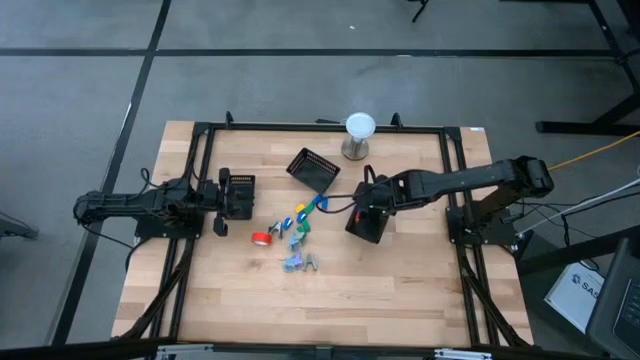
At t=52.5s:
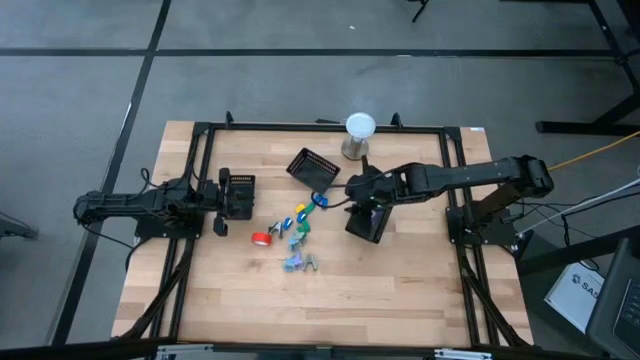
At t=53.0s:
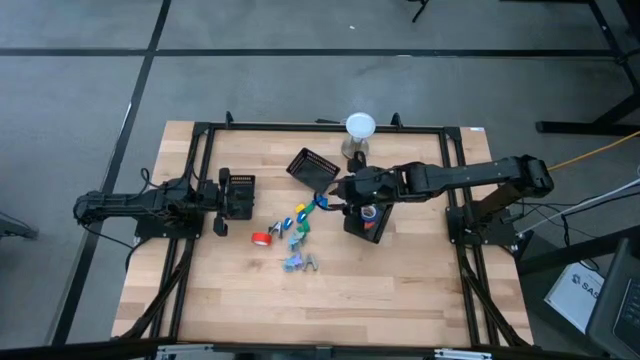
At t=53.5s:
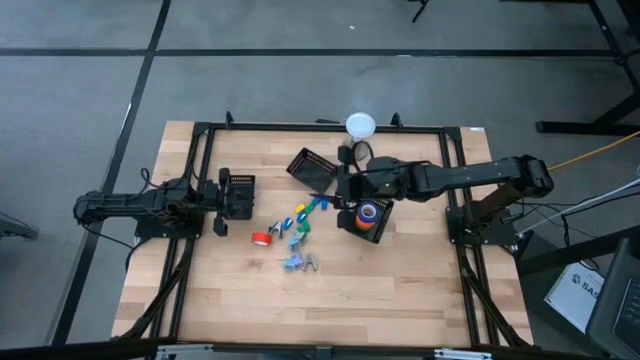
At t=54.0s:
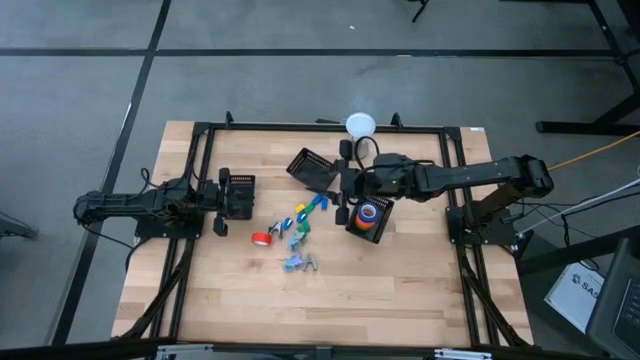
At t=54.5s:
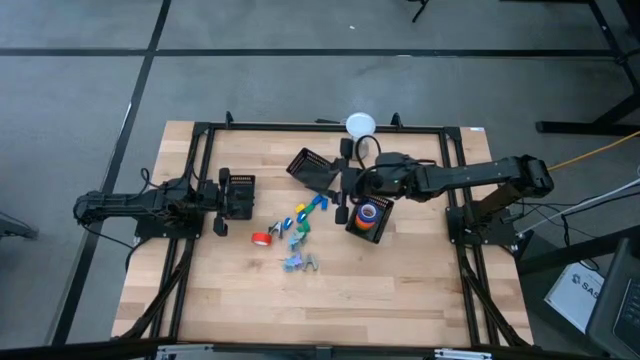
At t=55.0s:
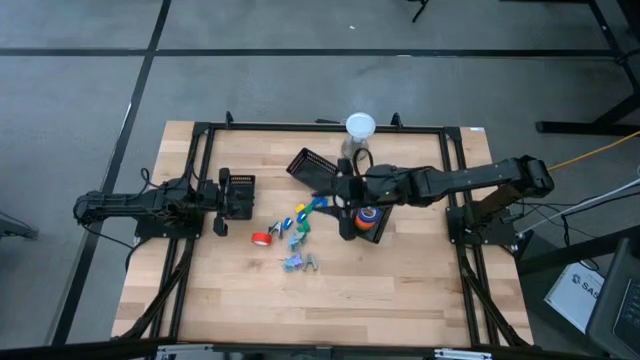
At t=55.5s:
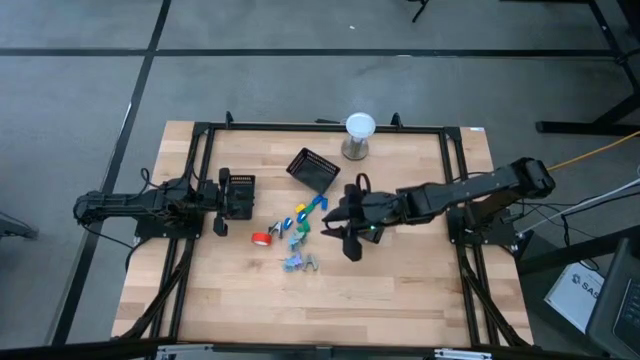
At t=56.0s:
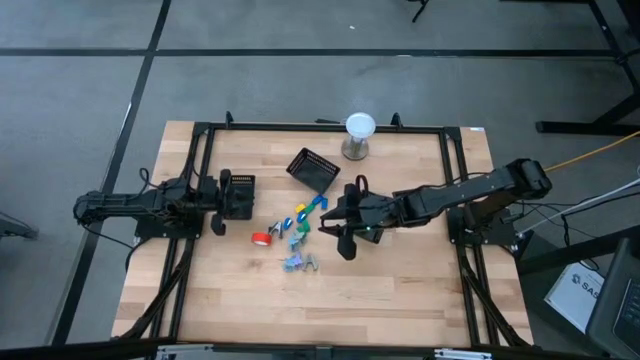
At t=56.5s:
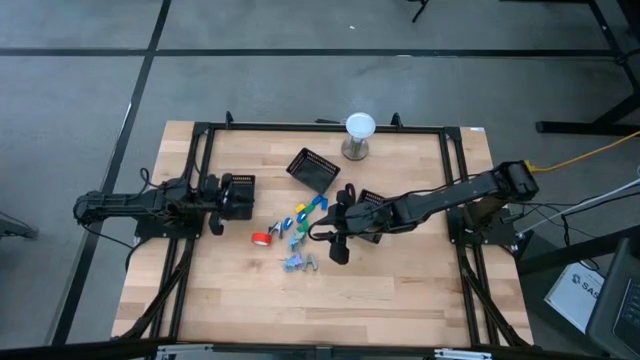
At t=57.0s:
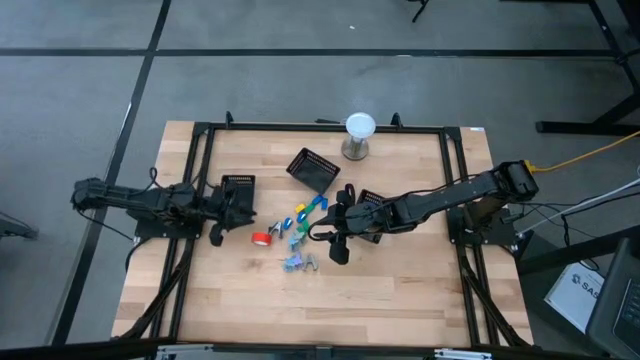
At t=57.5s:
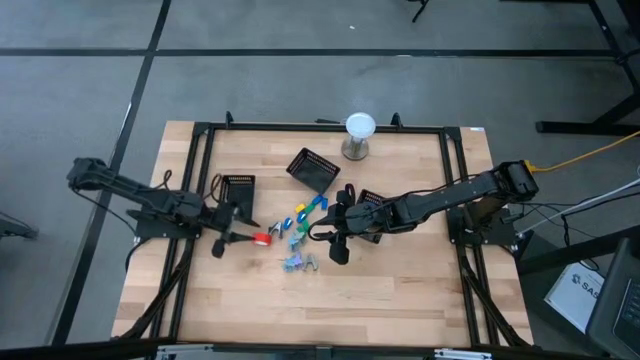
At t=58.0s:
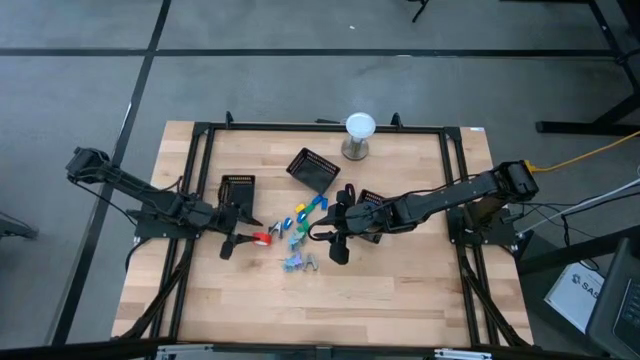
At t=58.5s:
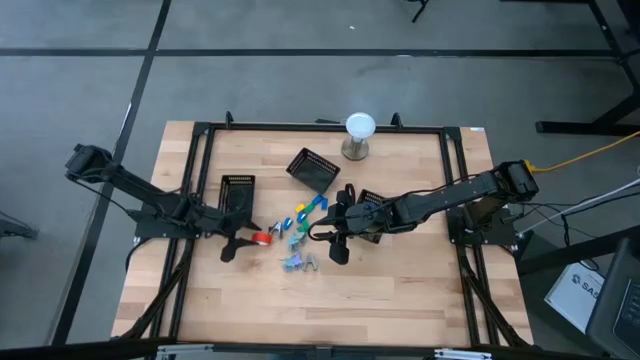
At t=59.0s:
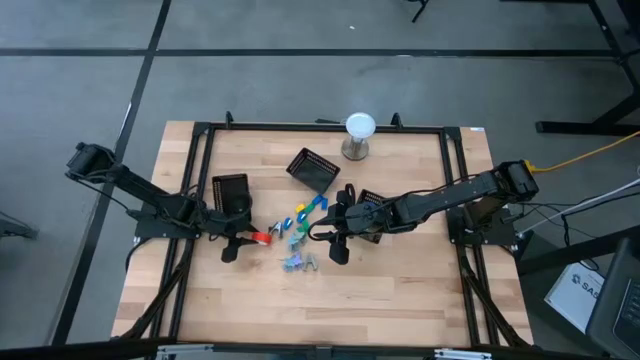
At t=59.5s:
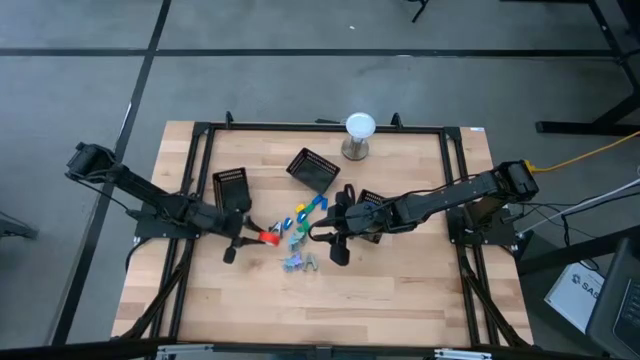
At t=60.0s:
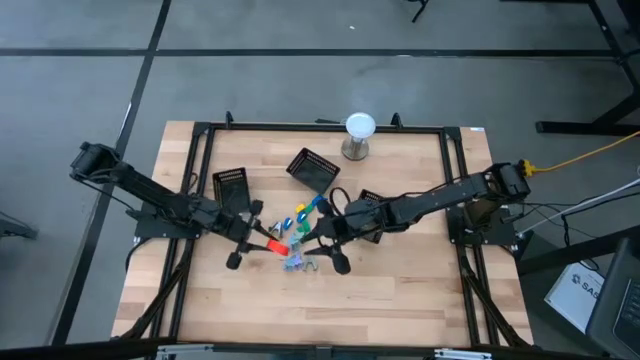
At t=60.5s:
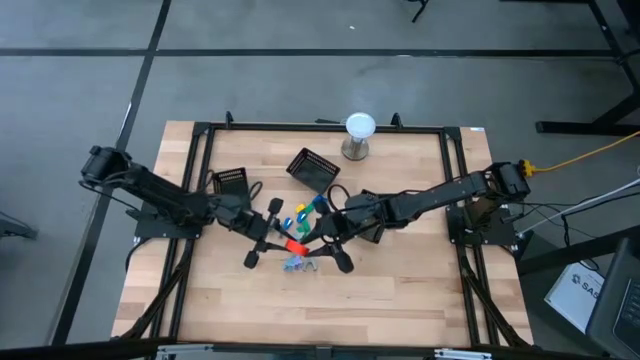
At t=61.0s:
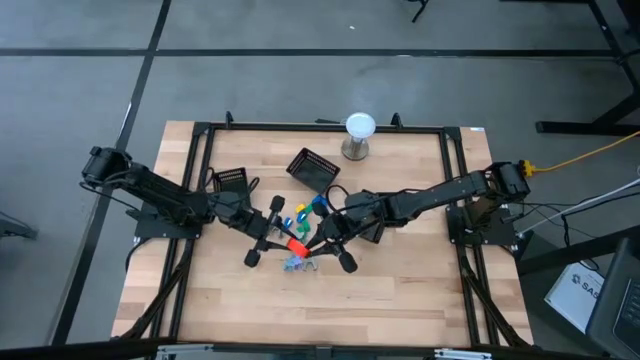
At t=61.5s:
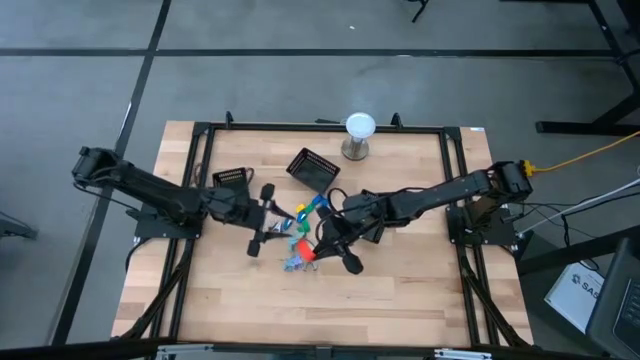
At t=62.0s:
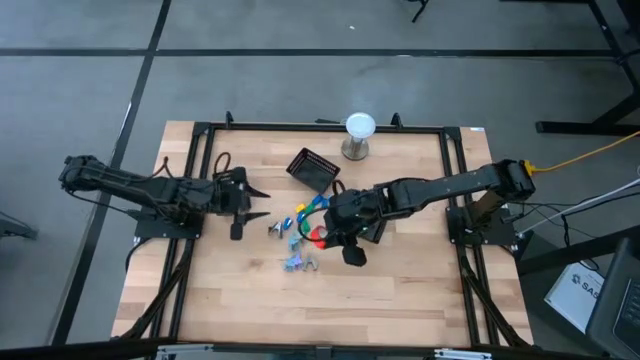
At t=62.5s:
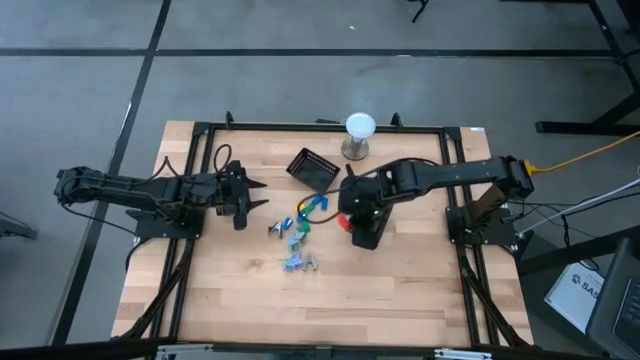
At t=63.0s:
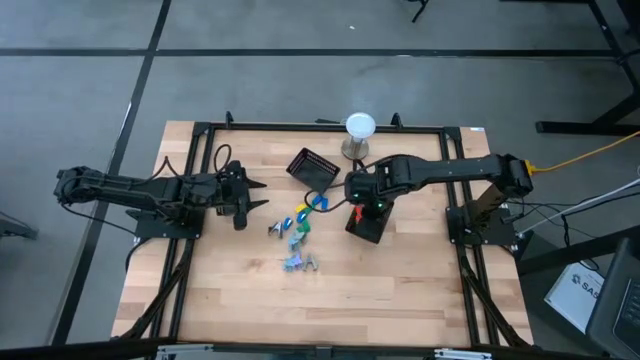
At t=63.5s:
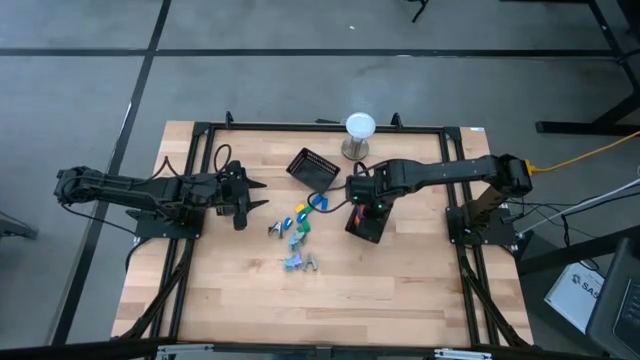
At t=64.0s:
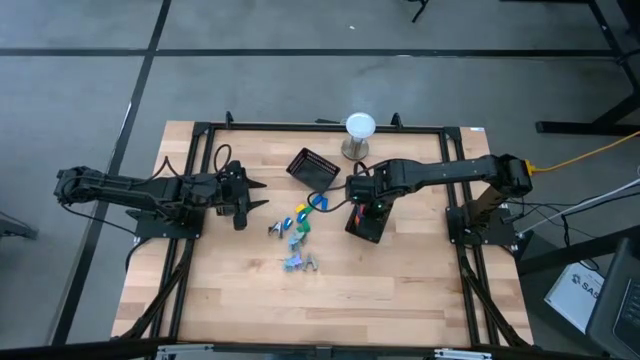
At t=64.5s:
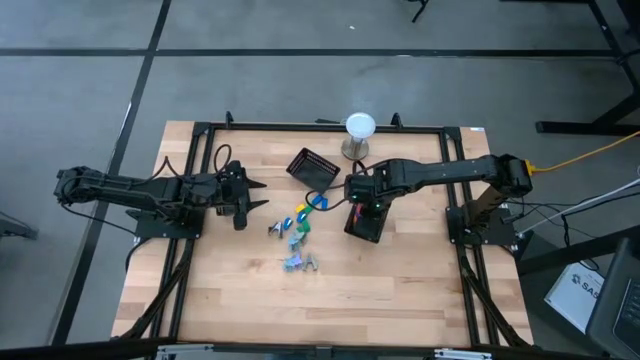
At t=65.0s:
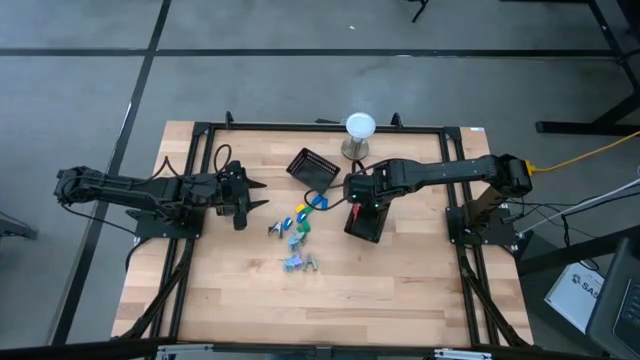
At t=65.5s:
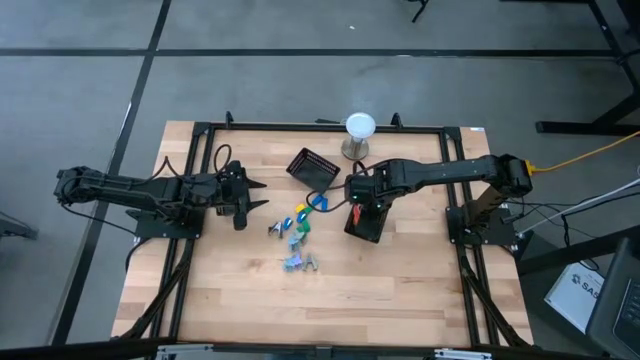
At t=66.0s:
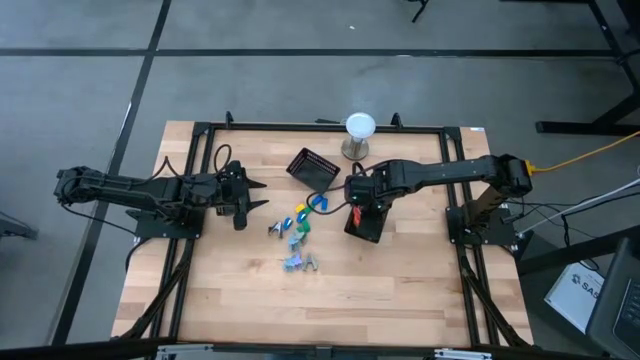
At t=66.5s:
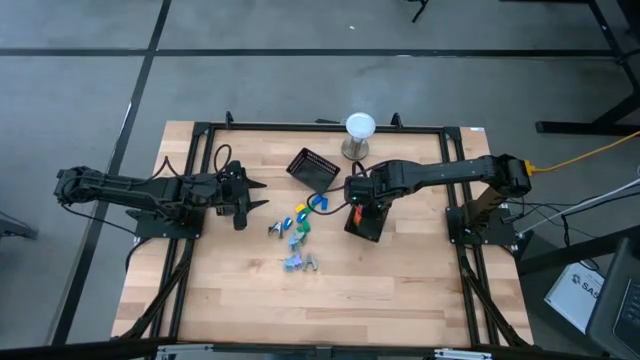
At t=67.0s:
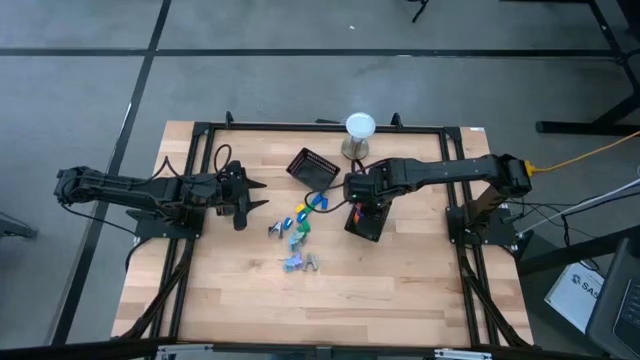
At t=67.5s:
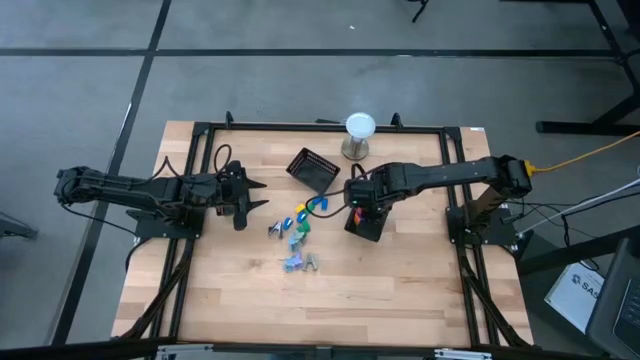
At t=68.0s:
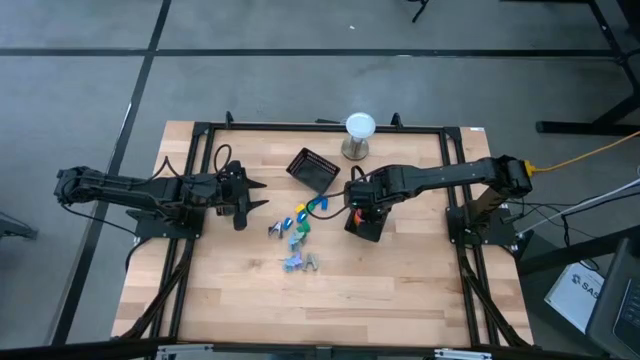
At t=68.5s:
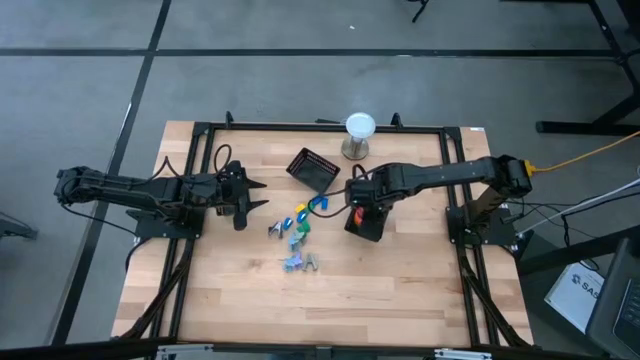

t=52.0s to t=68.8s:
Task: Pick and place Stapler, Stapler remover, tape
Put the red tape into the right black bin

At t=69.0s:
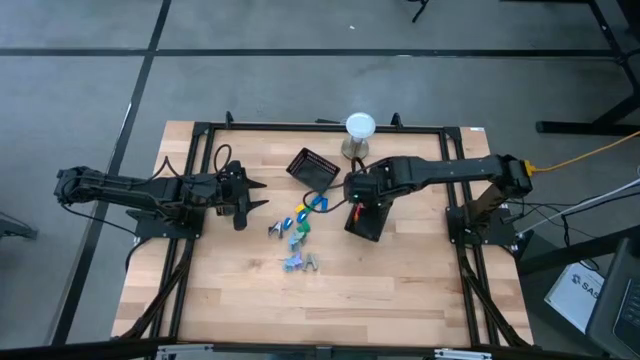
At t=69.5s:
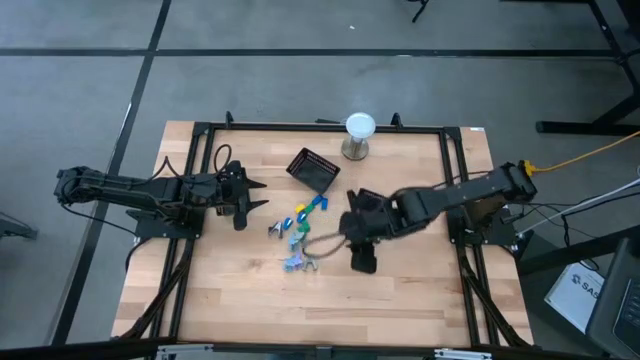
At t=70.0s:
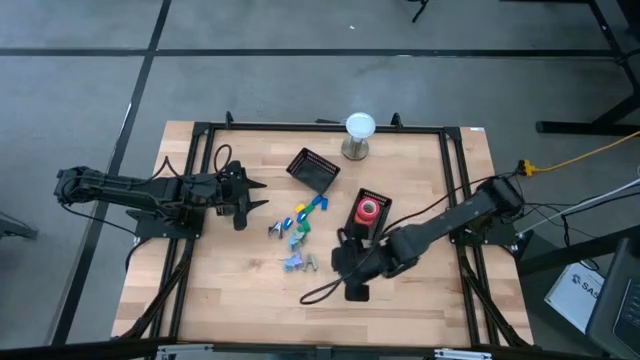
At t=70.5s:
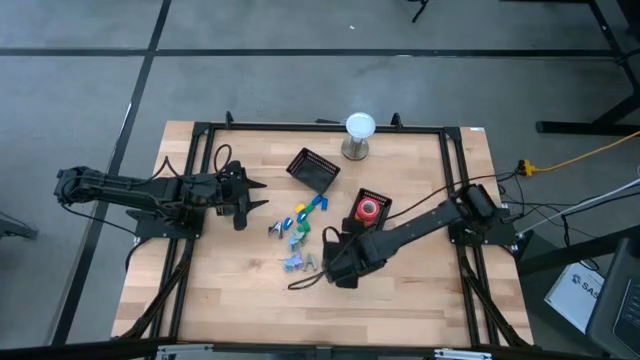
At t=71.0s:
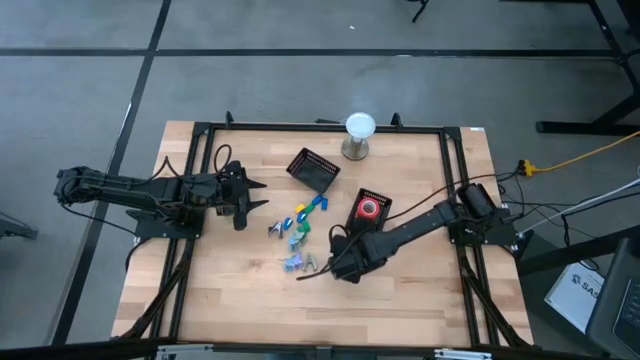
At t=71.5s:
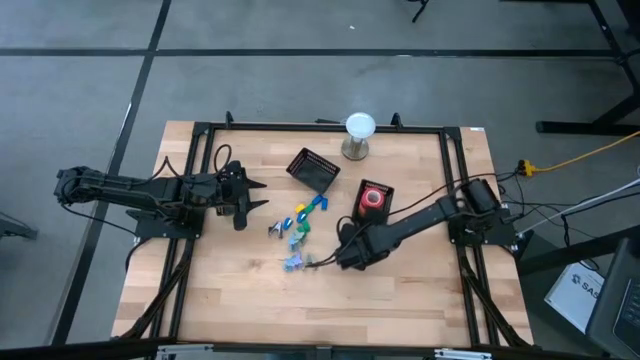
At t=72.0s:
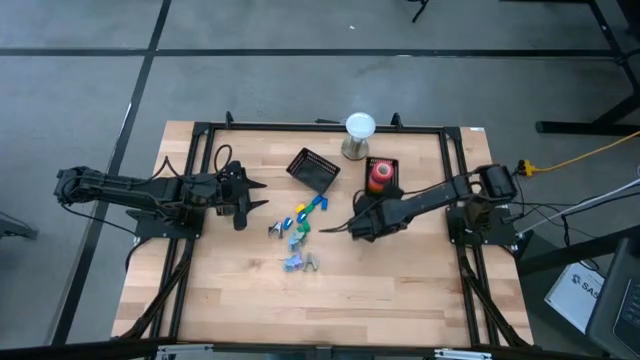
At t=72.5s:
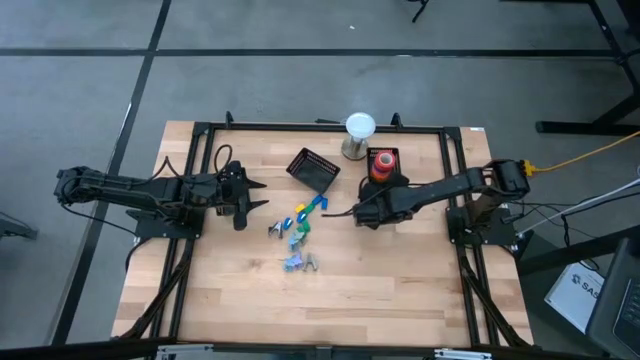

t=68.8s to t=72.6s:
Move the right black bin to the top right of the table
